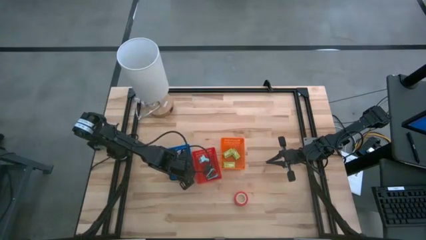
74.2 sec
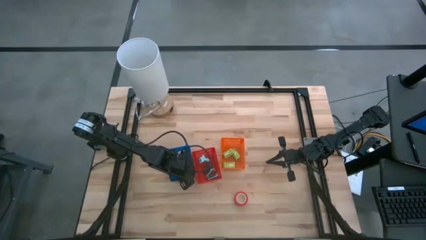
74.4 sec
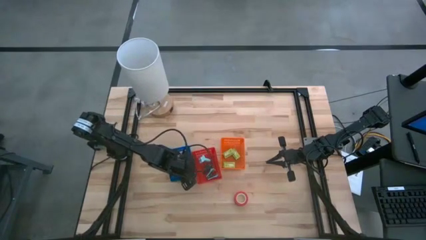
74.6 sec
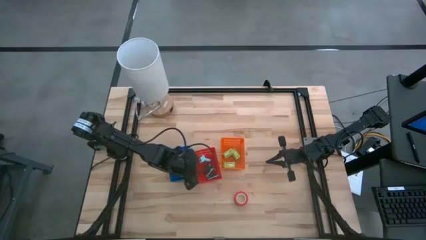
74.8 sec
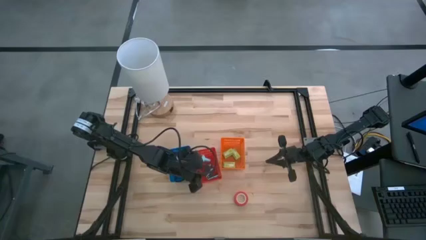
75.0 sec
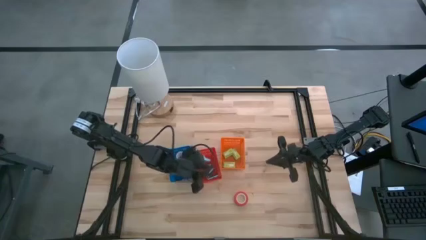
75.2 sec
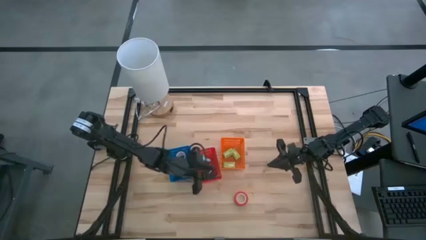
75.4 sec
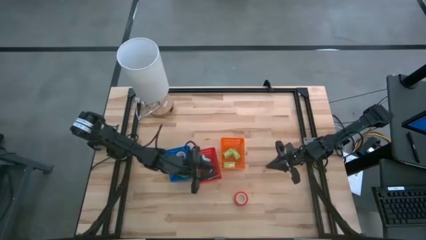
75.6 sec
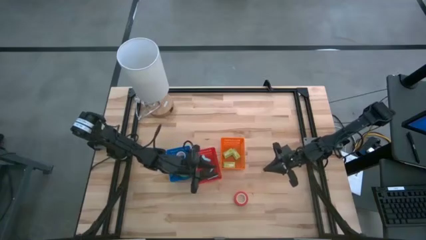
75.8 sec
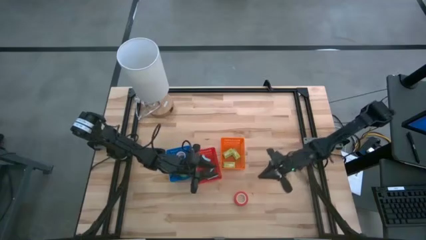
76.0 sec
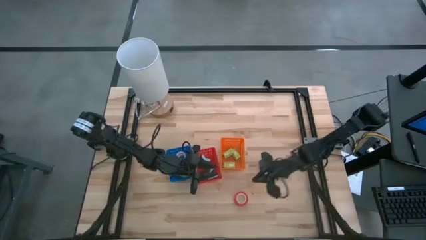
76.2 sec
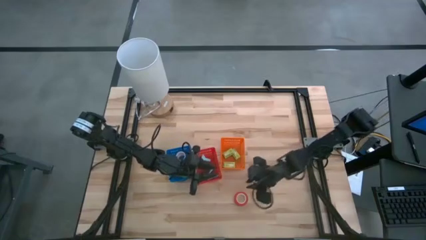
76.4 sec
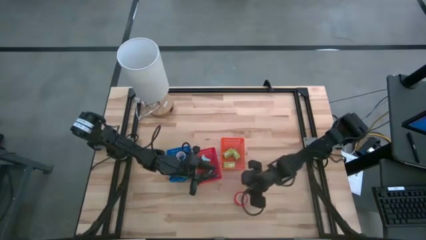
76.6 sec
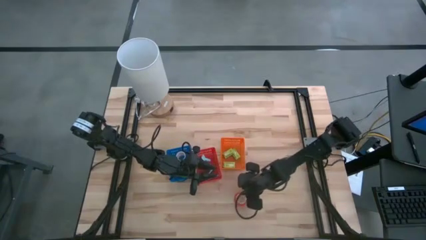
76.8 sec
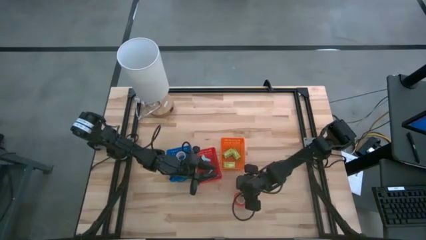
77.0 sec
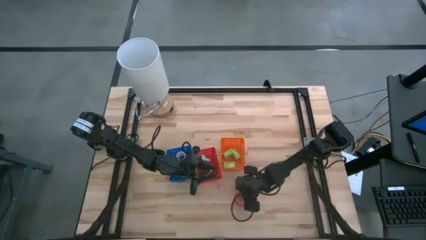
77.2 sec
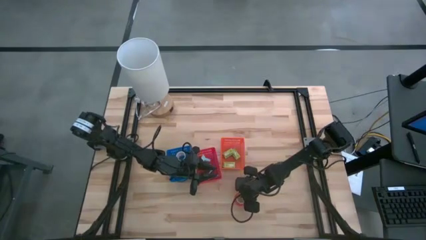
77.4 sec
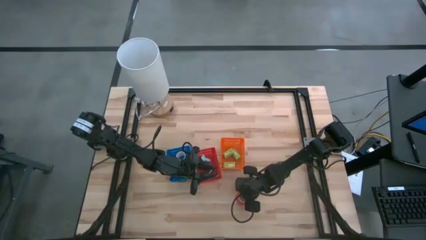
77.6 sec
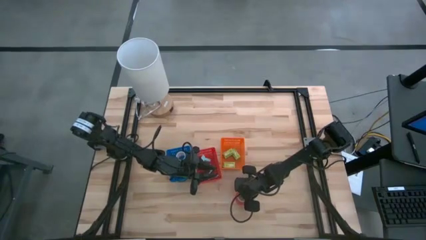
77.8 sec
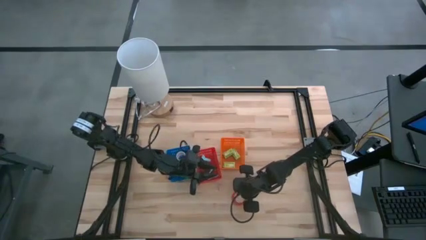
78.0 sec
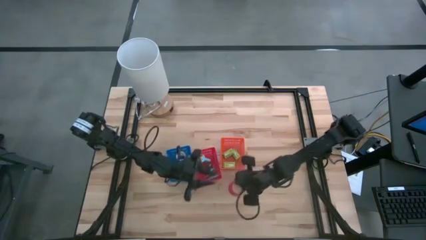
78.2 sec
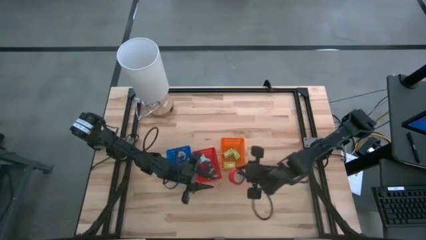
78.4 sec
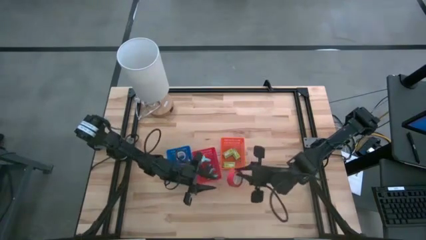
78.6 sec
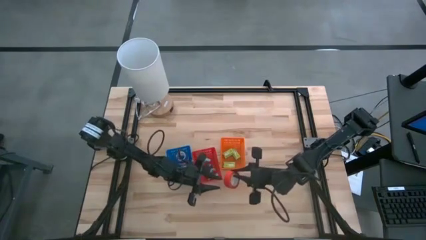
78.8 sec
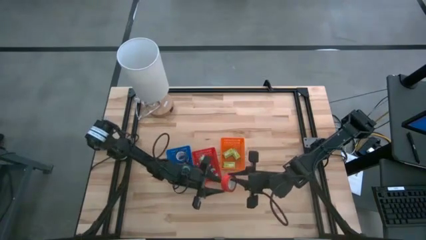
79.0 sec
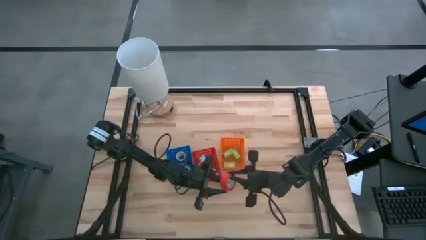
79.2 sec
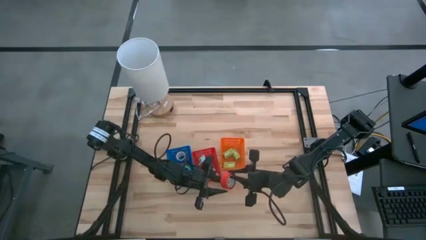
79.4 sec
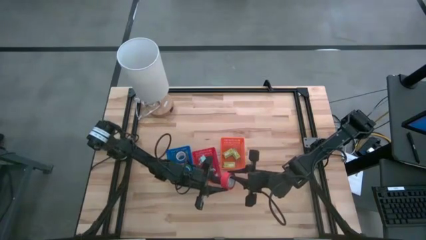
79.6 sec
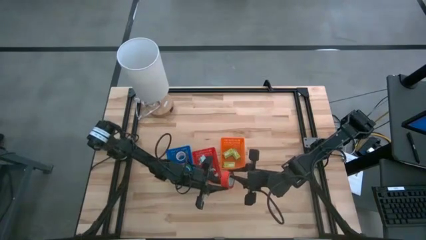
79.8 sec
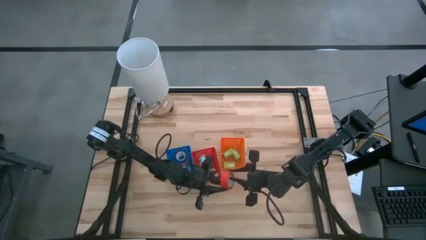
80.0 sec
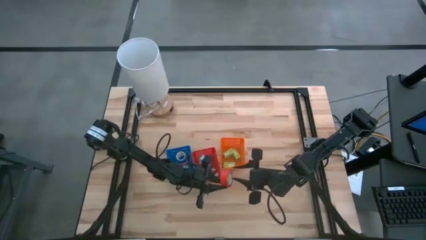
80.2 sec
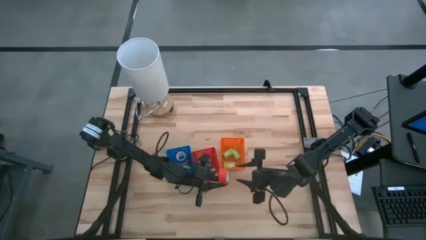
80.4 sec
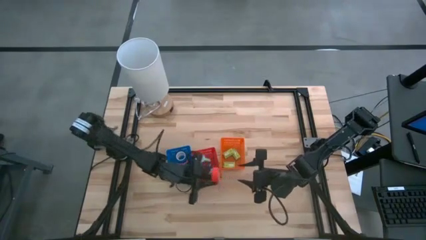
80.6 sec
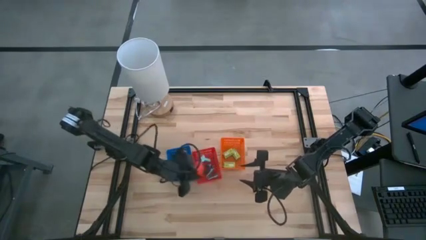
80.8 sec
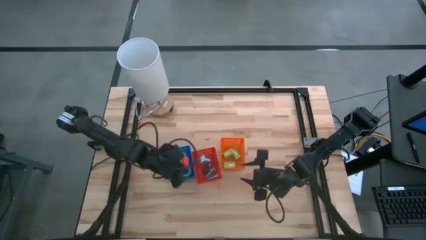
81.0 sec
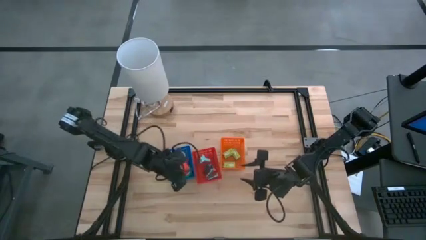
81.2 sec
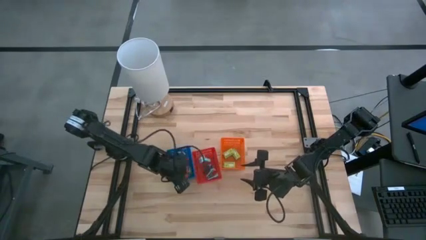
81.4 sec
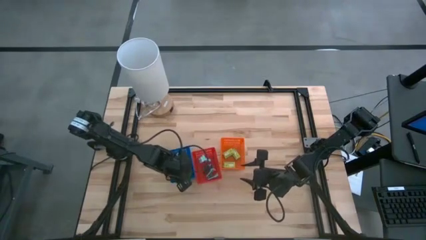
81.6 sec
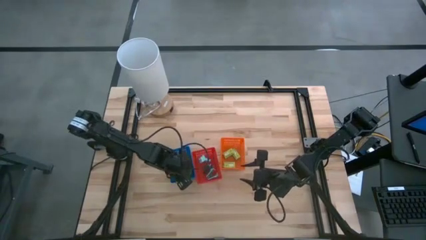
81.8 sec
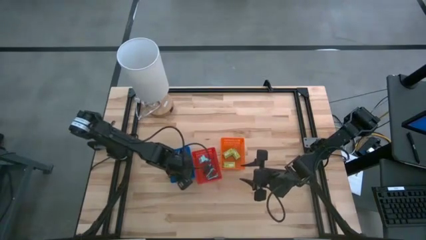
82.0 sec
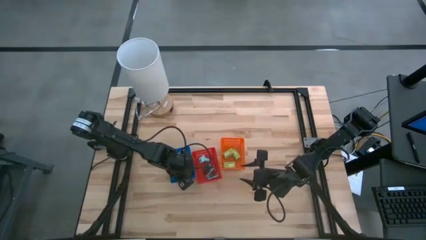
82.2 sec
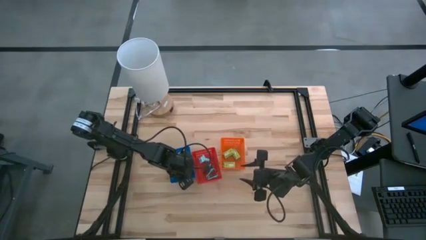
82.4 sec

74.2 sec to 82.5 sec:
Task: Pick and place Stapler, Stapler remover, tape
Put the red tape into the blue bin

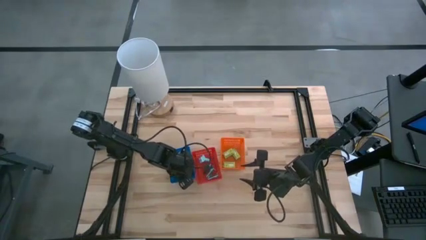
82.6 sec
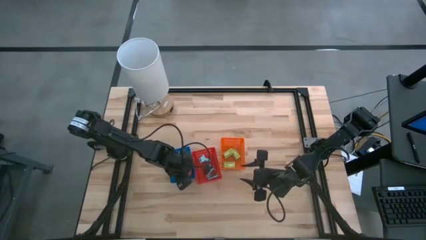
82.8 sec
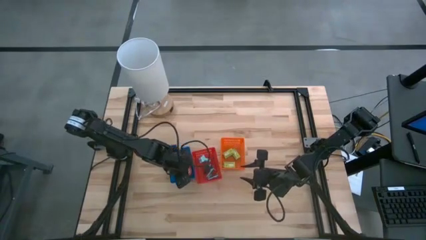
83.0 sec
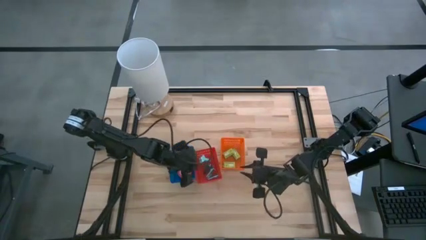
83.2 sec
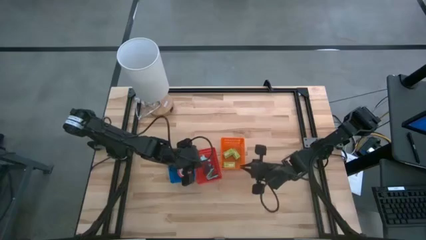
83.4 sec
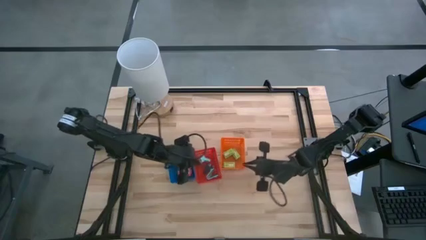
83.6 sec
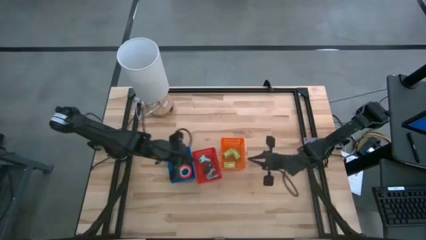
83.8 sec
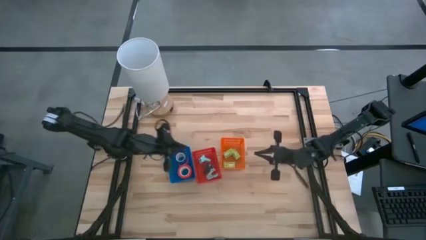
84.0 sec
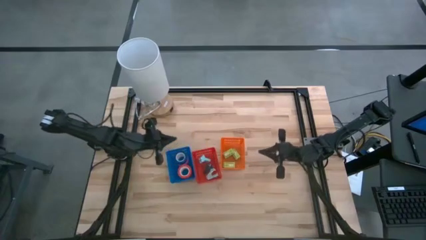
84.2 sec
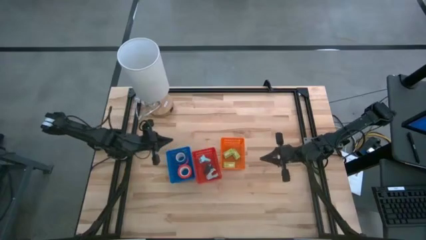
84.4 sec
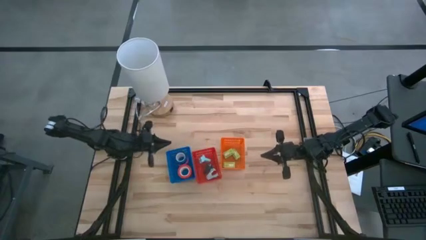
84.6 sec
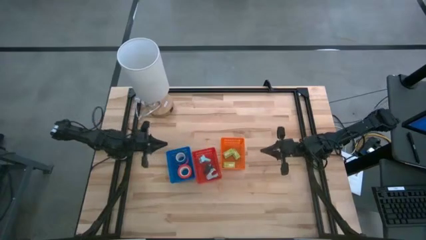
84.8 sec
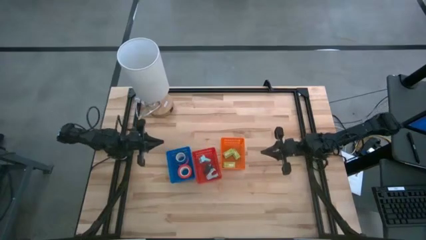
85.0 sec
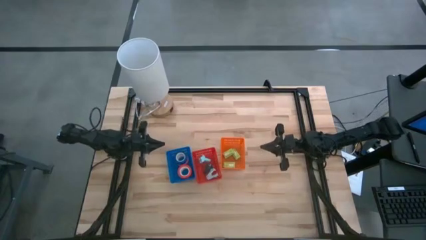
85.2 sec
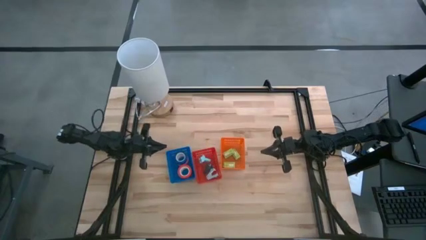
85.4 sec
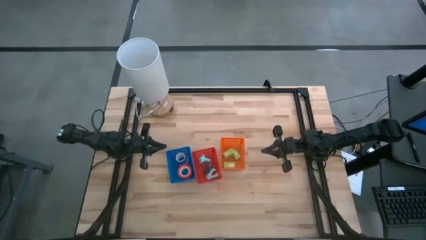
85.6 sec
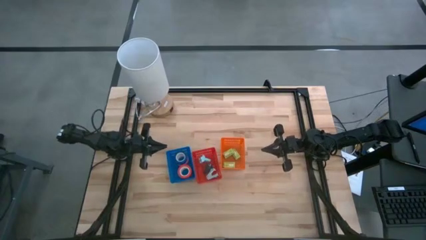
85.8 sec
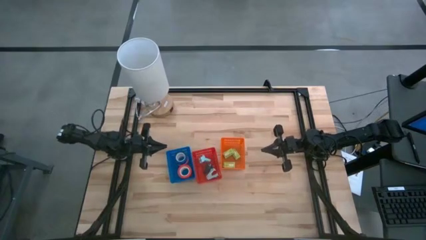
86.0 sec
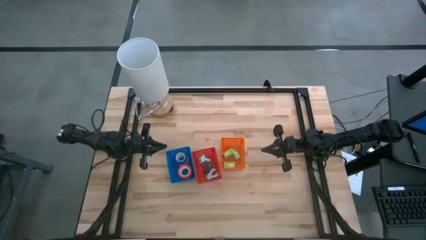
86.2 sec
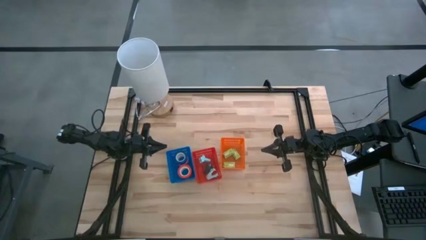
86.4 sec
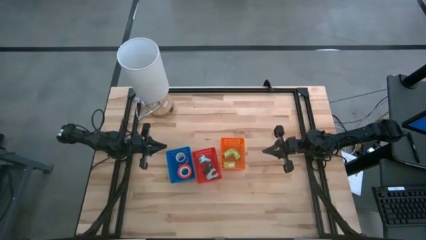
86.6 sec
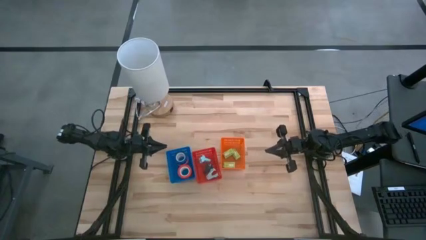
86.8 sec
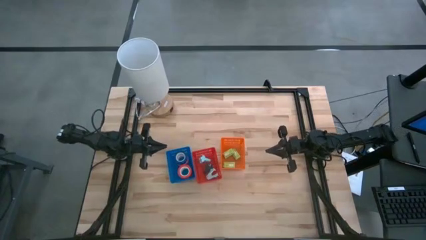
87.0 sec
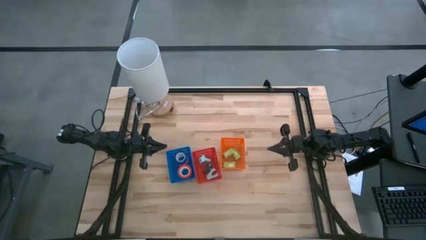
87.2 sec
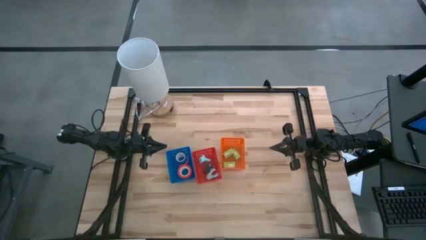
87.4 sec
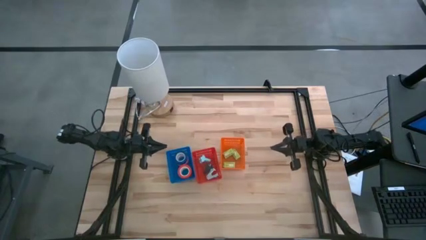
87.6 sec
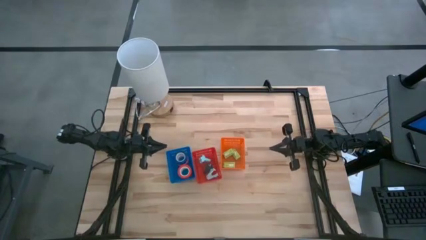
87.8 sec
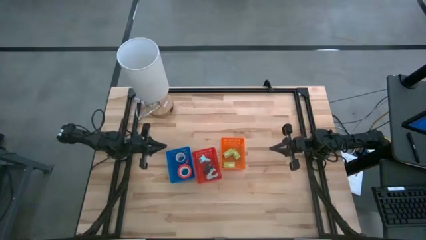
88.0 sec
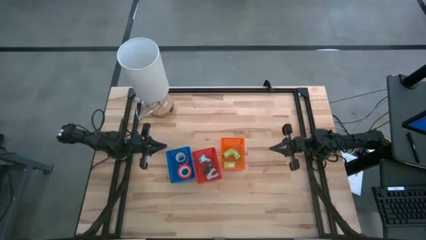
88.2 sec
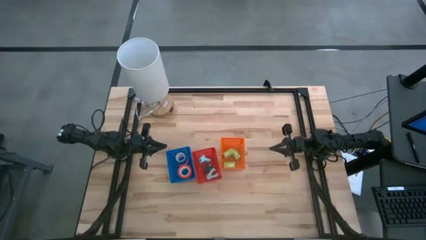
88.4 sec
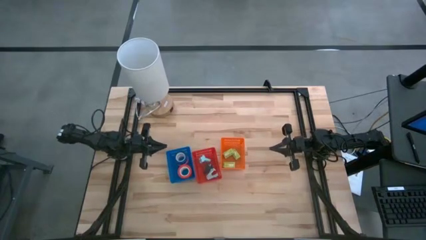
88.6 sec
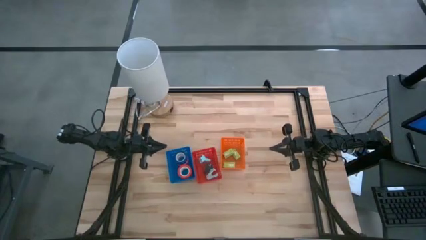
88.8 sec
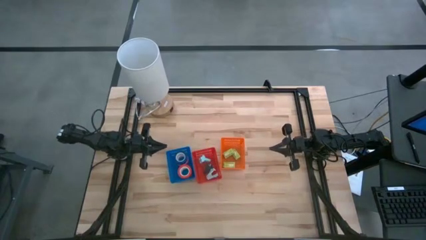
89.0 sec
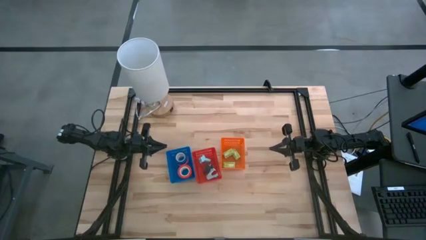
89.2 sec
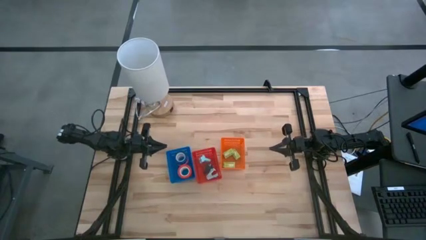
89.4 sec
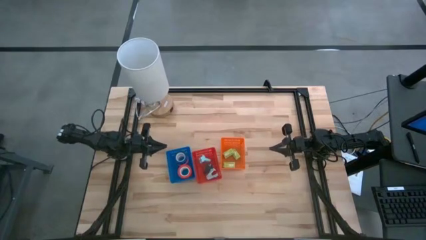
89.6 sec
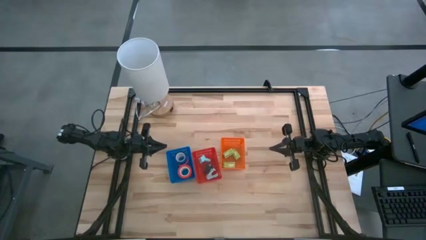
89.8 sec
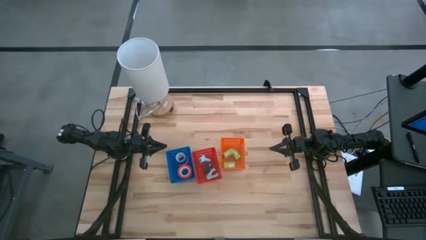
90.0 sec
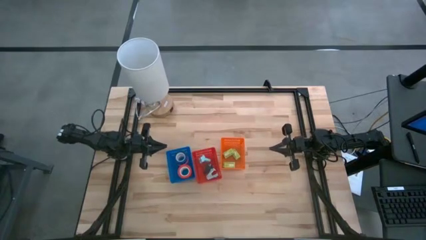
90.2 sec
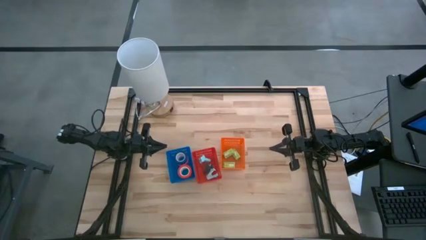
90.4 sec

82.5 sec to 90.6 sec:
Return to Home Position
